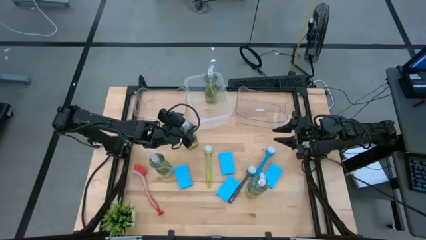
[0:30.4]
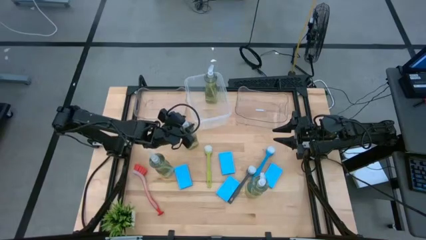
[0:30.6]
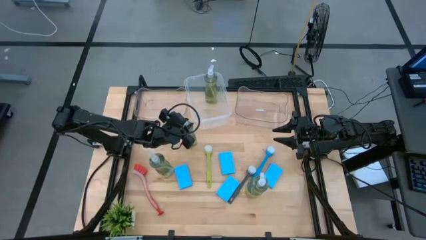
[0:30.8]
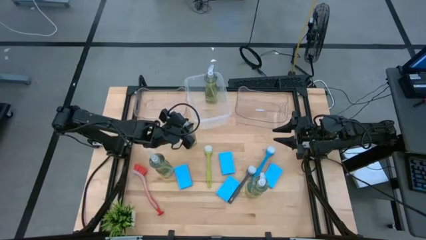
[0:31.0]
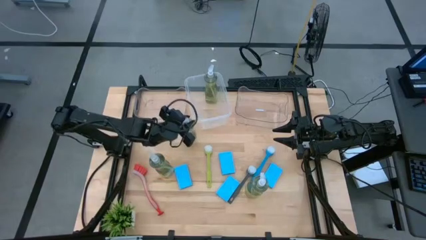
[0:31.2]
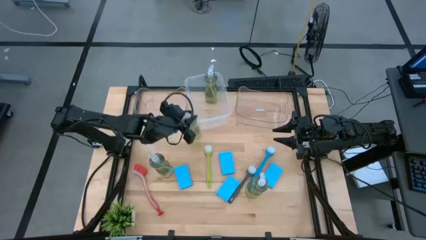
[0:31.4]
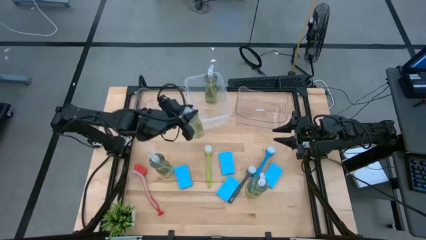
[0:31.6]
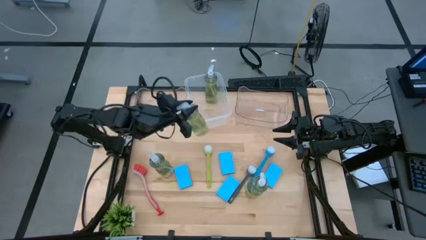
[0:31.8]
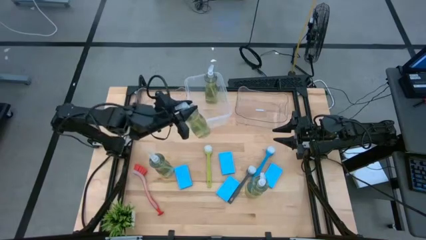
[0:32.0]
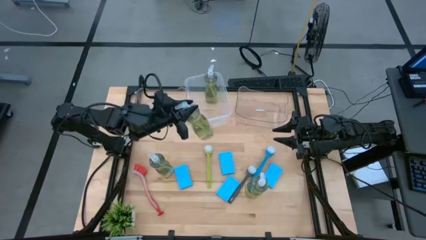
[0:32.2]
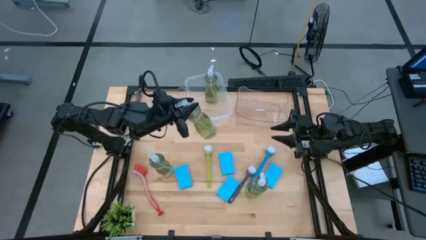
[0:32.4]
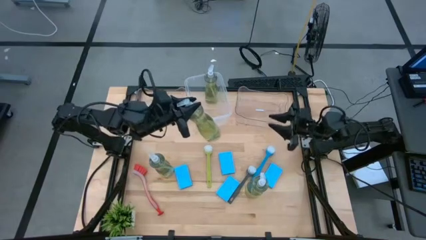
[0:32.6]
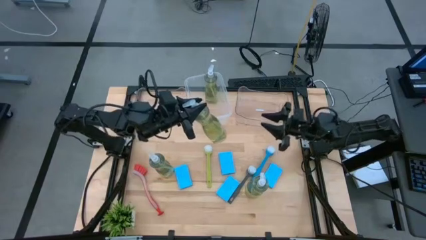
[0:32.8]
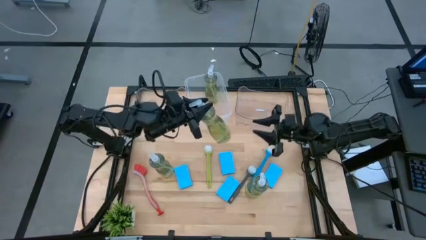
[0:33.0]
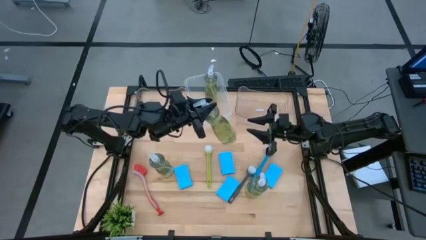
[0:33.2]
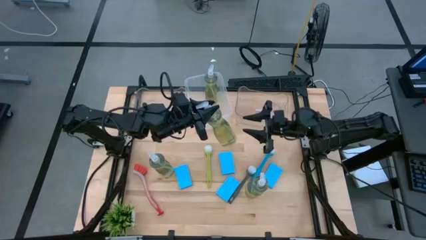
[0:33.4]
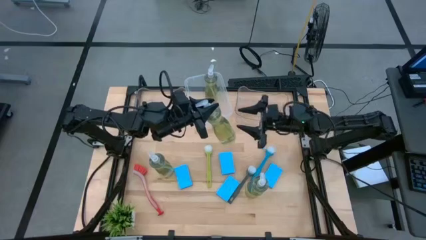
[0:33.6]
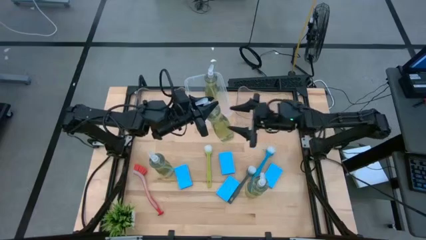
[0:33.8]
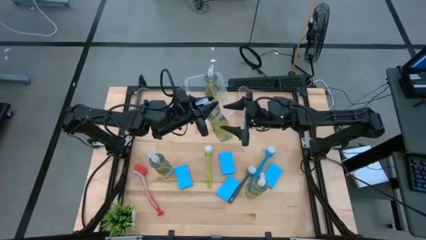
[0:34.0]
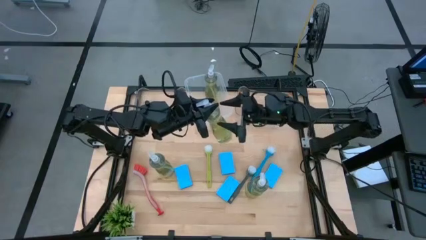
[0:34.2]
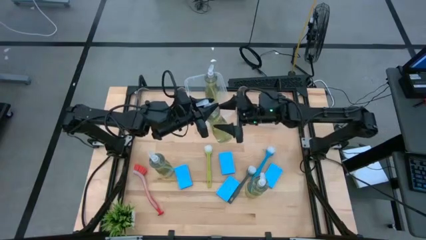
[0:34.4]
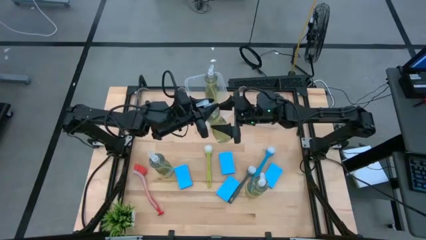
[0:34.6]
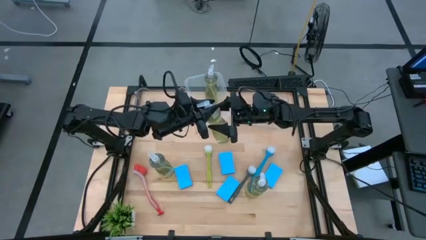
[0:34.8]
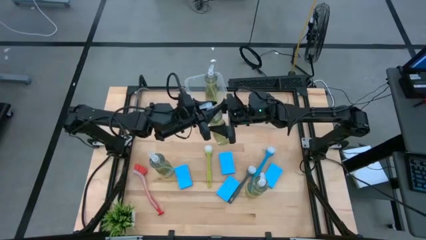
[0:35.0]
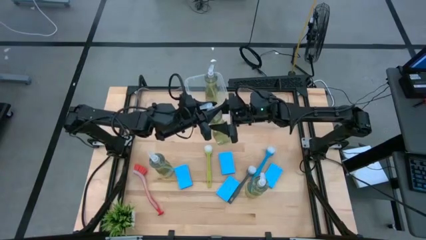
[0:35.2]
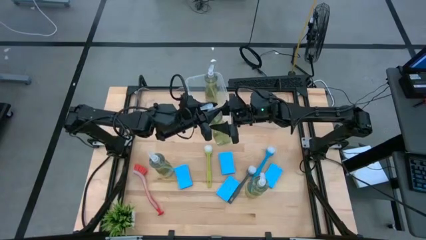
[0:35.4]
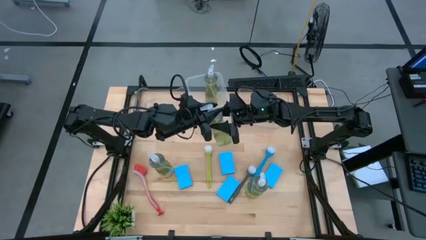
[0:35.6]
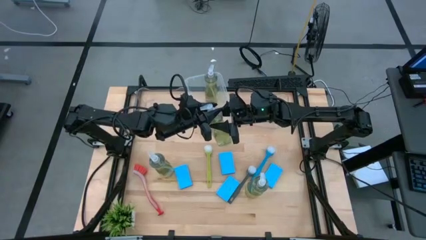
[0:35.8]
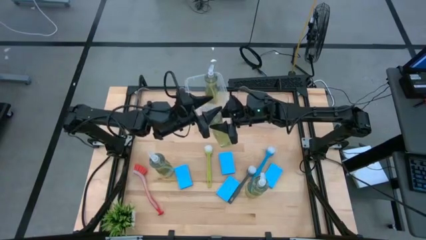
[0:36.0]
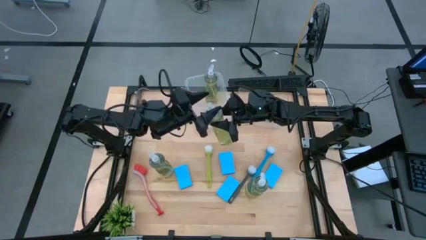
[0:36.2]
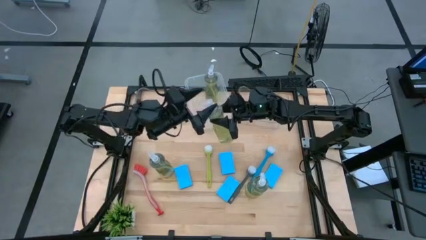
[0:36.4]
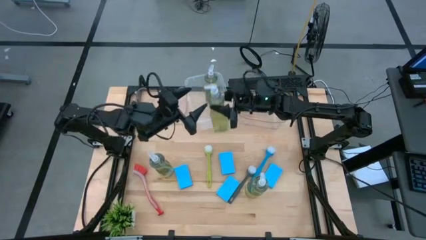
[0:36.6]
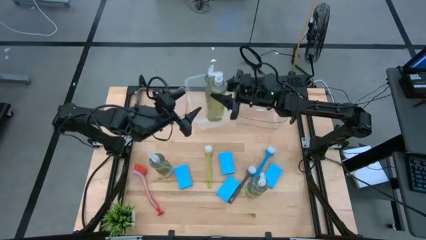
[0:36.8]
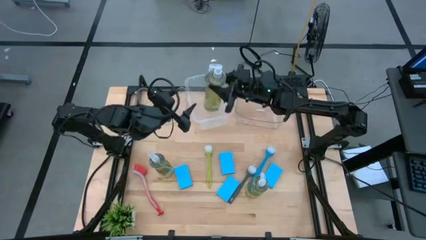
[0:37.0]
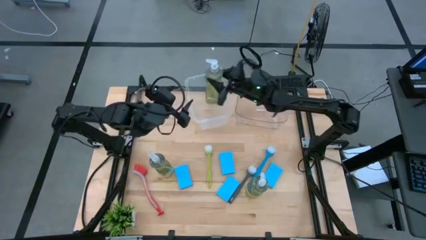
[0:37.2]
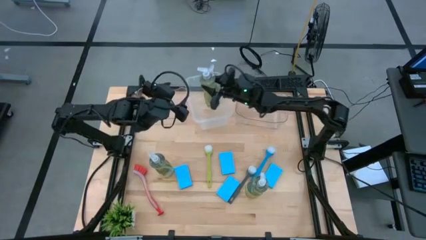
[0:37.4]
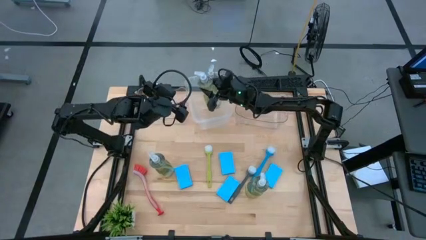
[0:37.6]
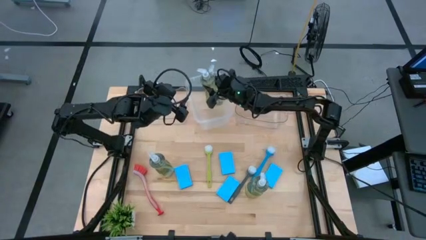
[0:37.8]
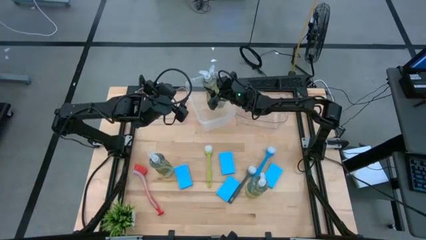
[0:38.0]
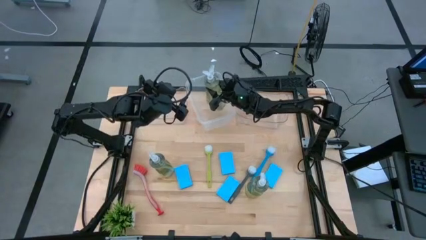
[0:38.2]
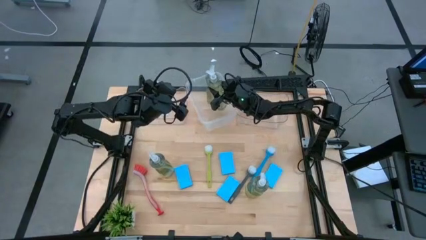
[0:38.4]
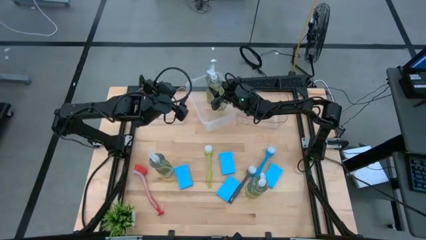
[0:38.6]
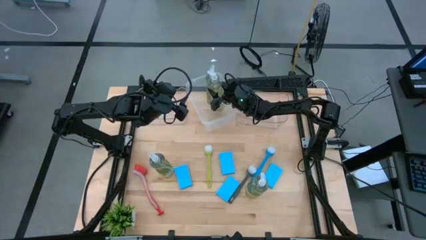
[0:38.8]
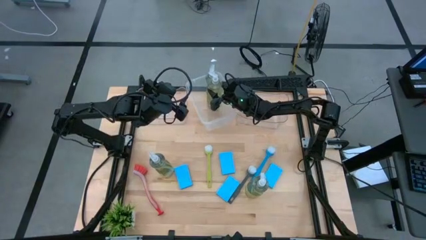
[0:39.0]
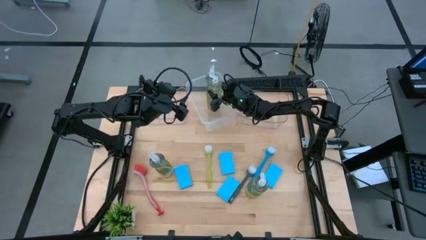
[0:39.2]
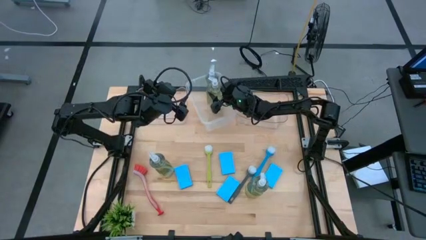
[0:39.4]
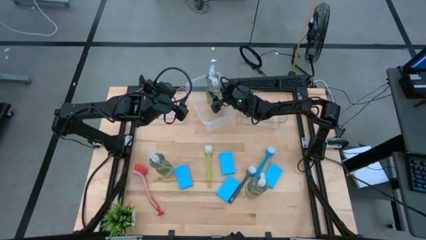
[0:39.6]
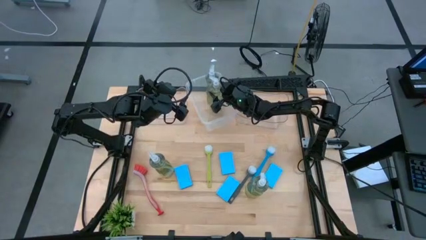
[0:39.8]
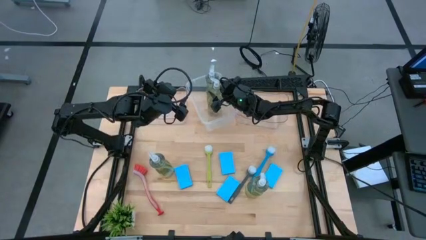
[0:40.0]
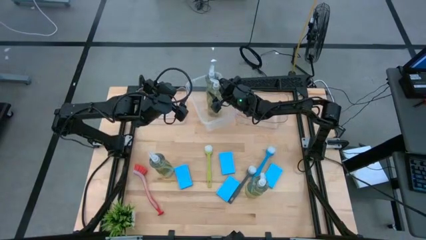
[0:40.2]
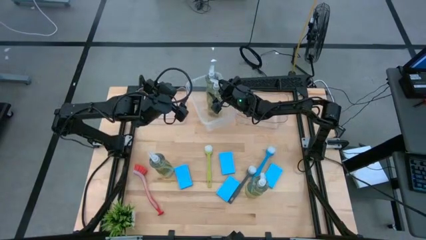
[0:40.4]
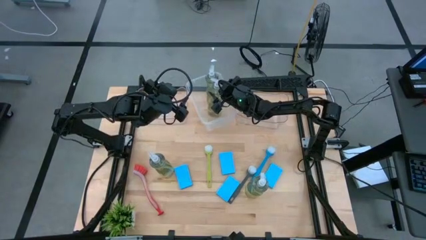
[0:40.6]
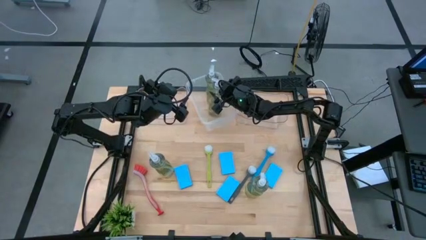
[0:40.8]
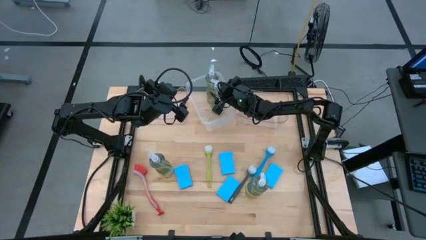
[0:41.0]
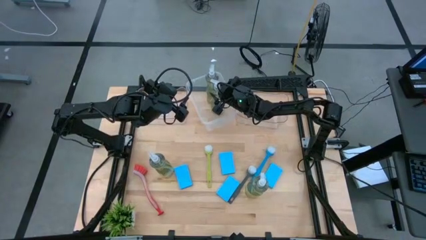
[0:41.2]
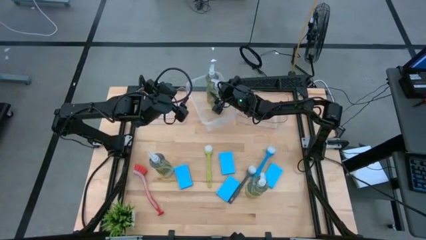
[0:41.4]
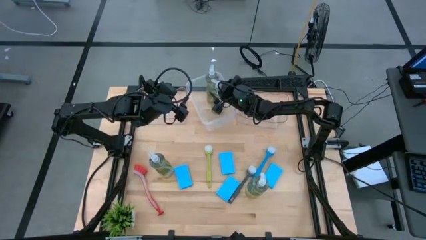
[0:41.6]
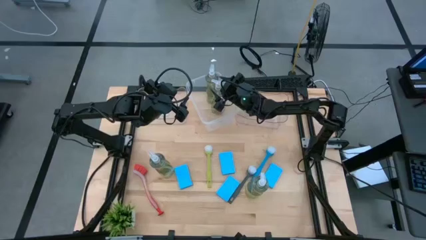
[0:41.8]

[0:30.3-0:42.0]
Task: Pick & Place Kitchen Sink Supplies
Put the liquid dishwashing soap into the middle transparent bin
